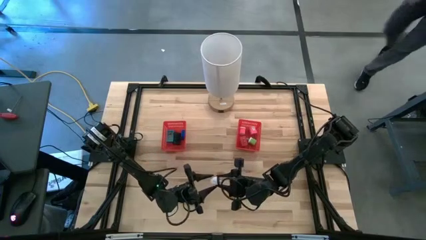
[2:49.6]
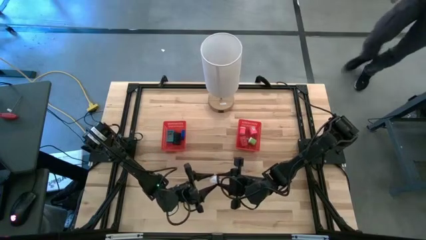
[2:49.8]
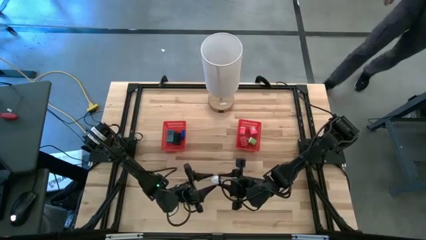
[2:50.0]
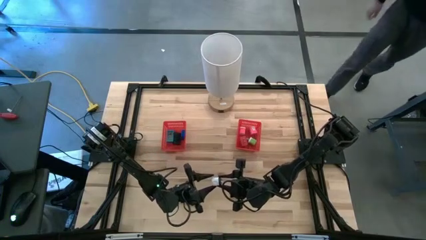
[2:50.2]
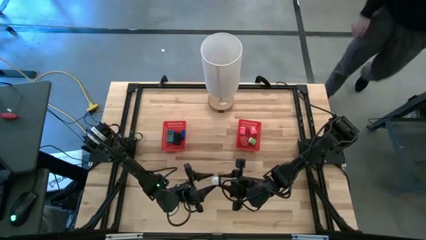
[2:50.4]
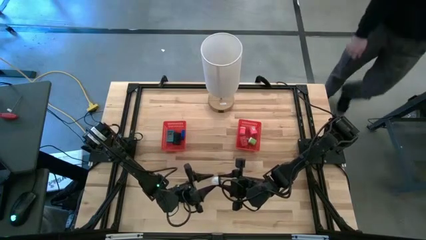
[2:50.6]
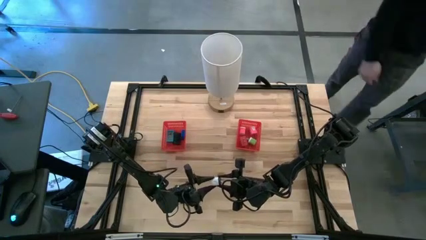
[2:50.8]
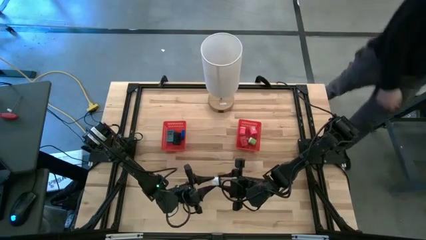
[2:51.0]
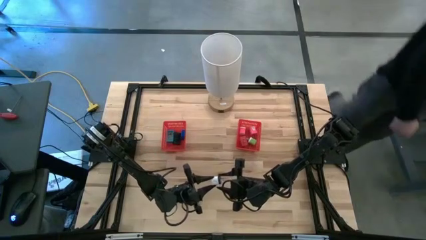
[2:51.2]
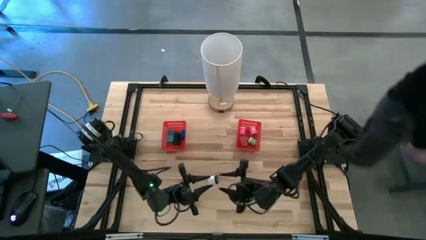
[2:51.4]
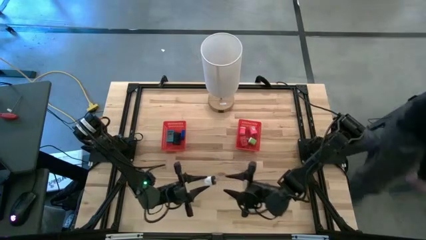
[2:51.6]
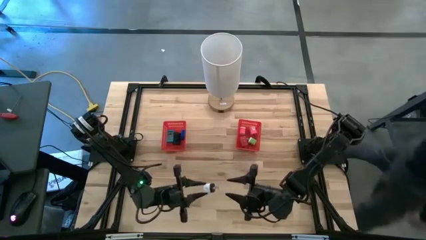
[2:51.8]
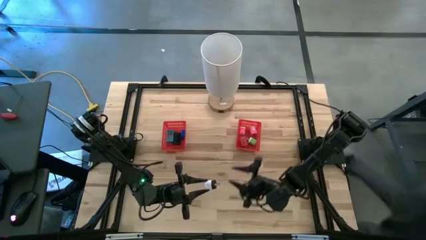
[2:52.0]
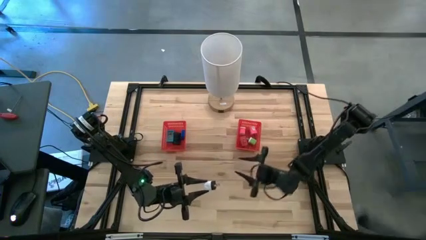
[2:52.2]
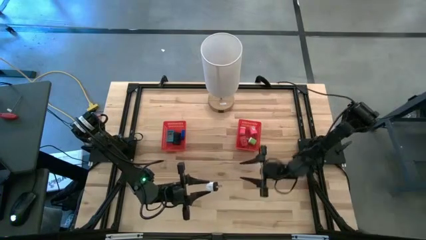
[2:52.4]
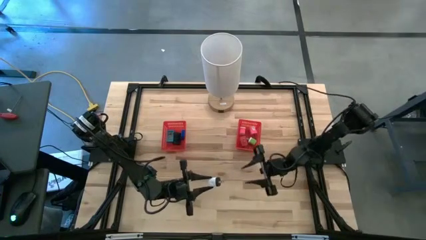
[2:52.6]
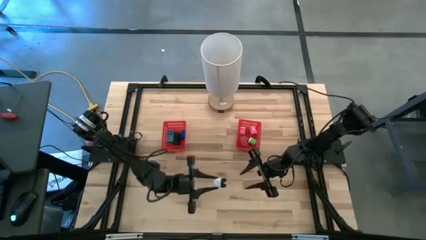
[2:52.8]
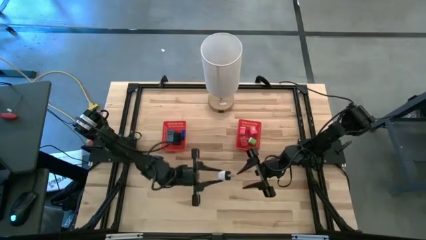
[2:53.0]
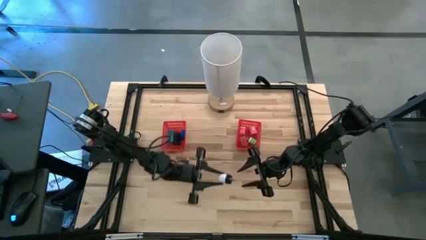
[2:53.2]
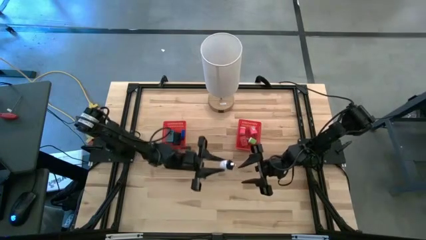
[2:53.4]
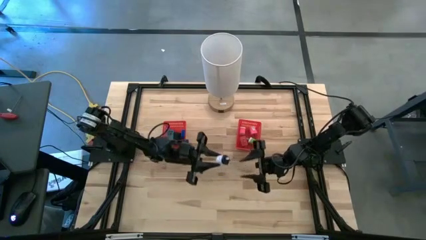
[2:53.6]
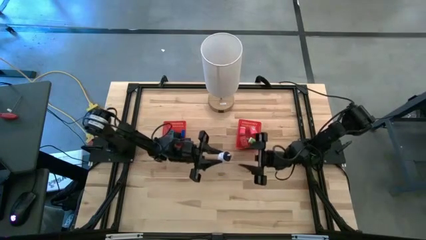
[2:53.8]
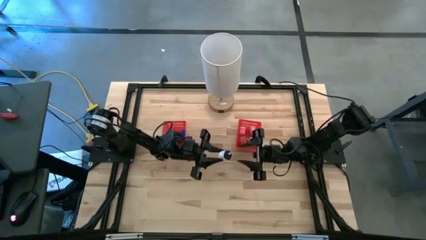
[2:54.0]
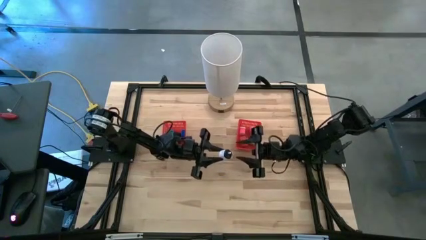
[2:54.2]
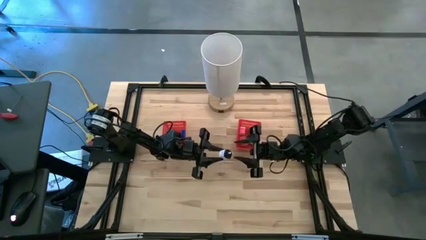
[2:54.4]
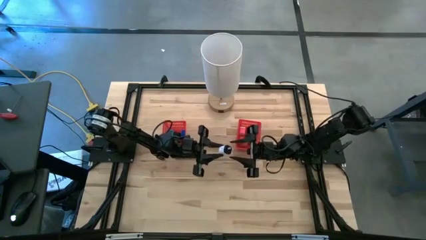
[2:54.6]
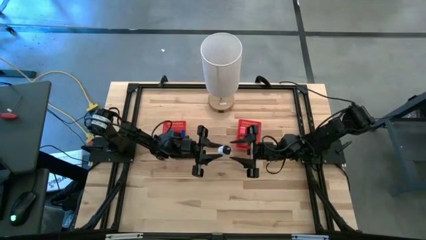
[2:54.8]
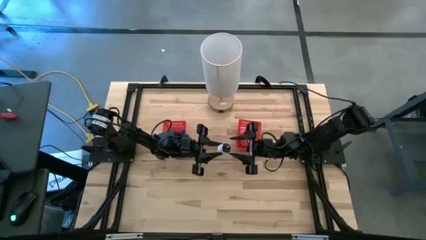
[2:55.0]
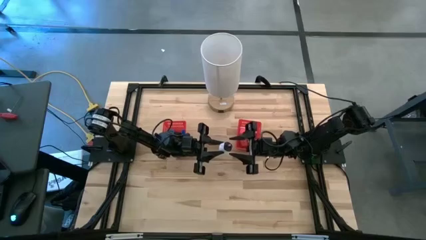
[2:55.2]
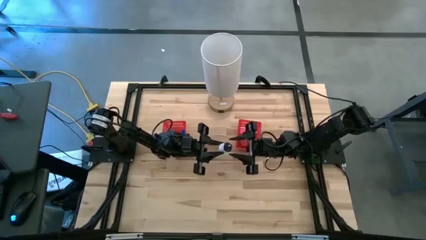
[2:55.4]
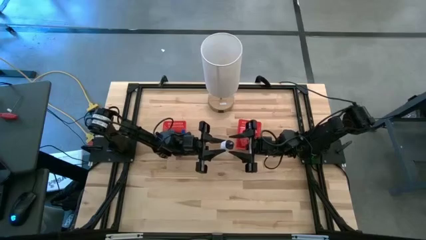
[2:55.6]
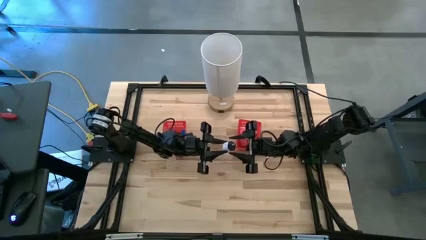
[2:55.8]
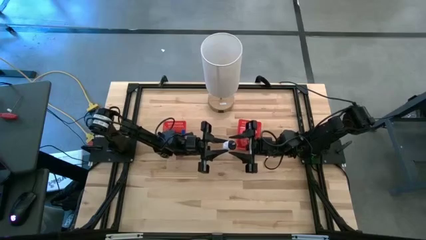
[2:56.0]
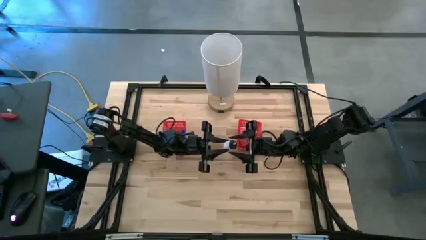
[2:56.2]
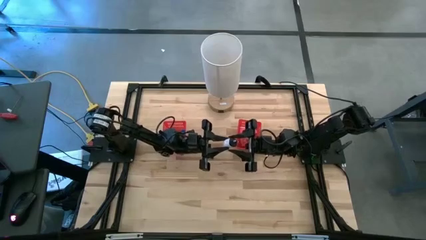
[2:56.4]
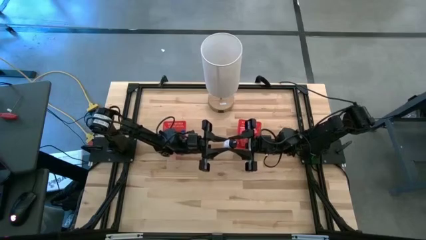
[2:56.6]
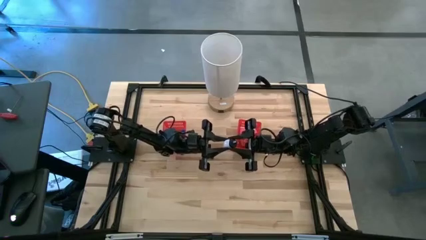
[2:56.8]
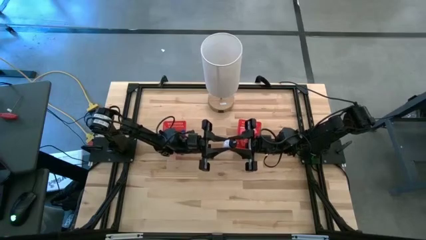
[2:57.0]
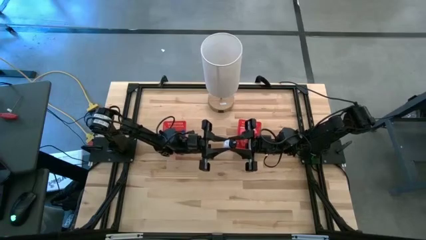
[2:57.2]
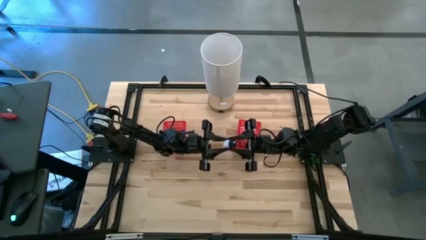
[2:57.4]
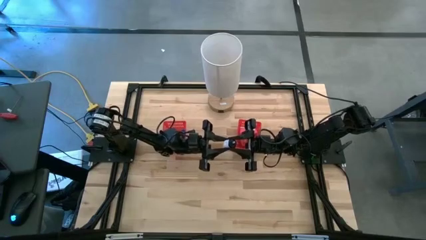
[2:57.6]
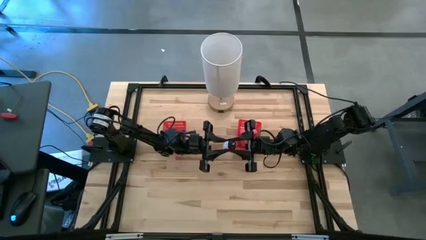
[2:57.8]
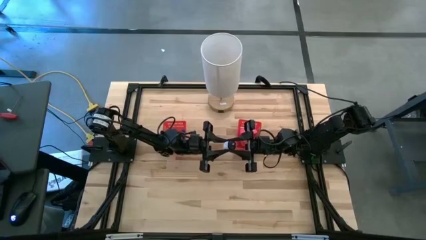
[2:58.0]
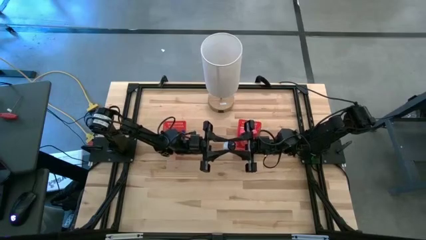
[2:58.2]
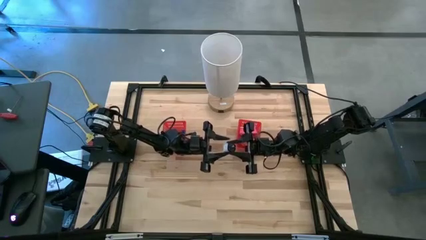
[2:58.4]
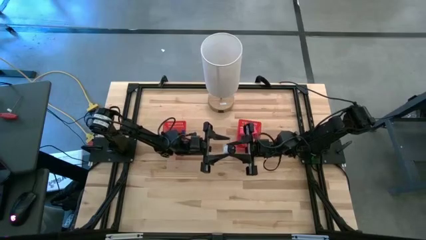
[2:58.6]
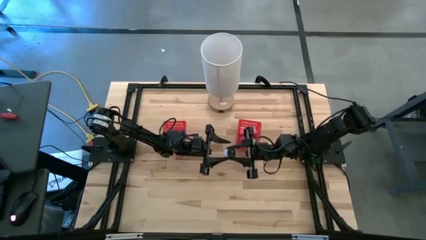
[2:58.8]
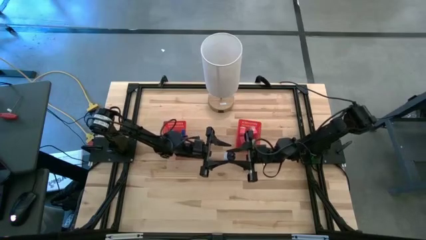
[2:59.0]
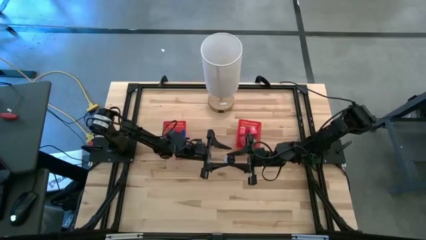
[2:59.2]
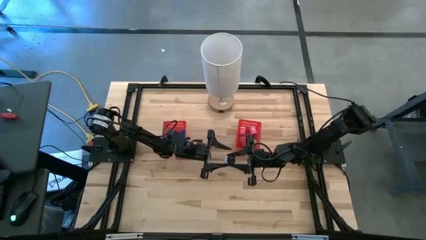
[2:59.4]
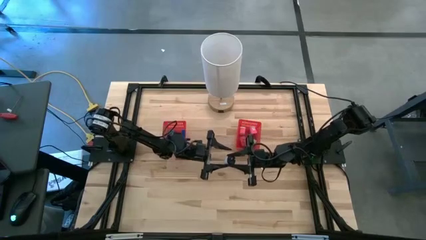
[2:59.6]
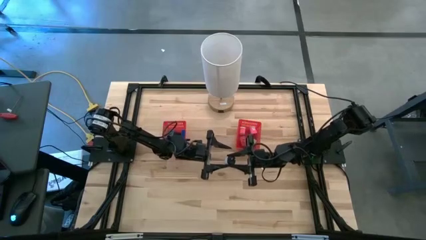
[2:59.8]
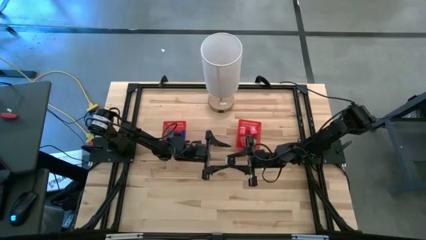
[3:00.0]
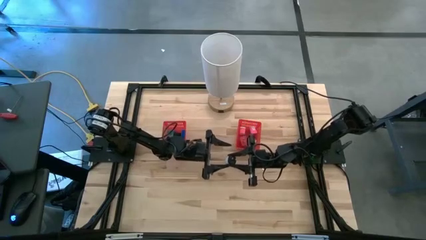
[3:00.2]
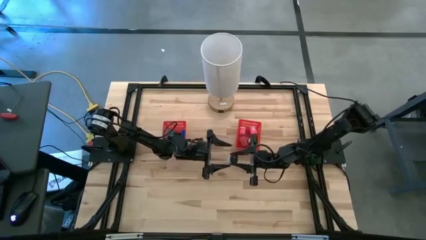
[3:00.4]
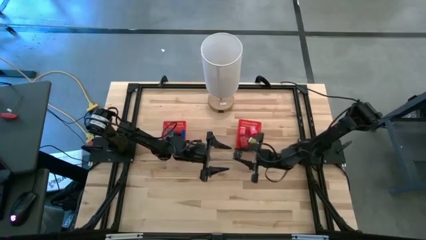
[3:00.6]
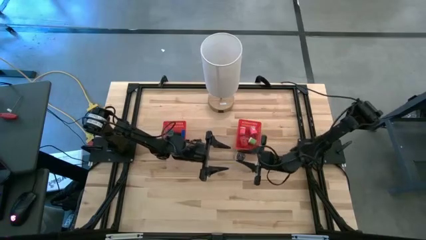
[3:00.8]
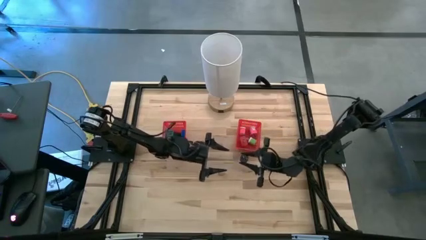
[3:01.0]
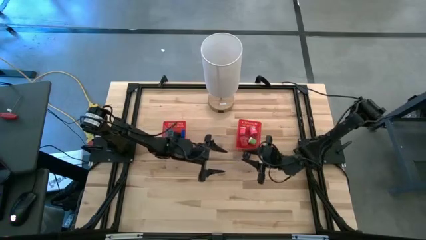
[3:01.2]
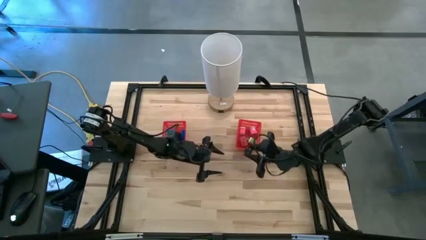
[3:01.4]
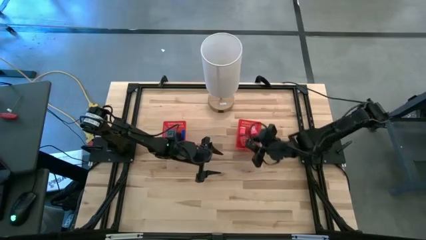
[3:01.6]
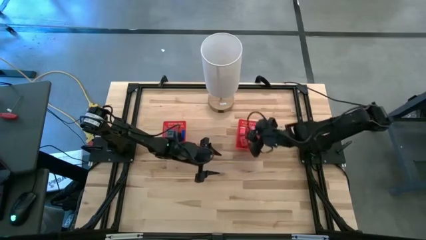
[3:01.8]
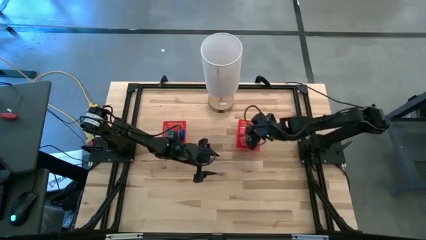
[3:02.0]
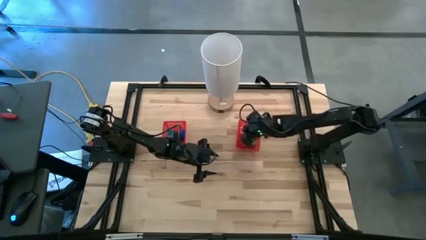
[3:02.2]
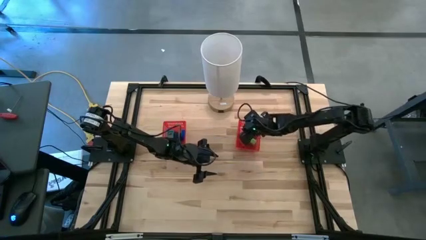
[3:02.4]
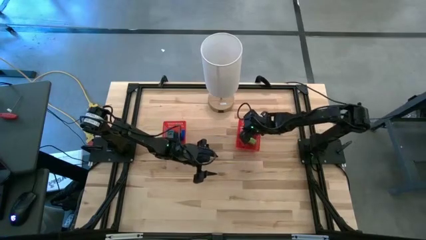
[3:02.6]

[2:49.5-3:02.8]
Task: Pick & Place Office items
Put the white charger adapter into the right red bin

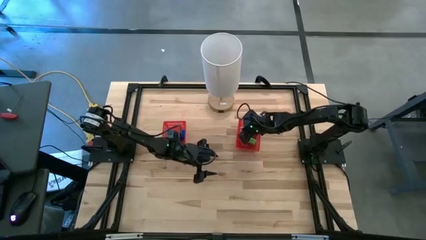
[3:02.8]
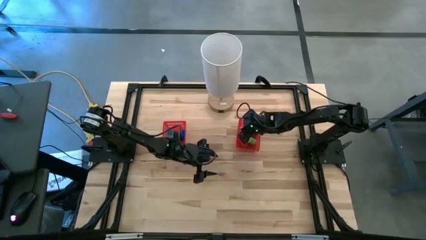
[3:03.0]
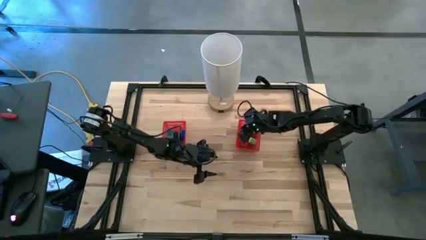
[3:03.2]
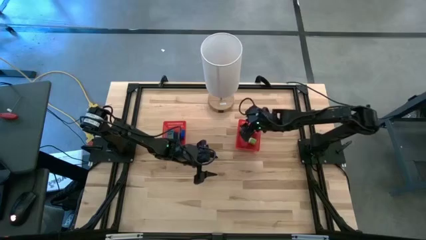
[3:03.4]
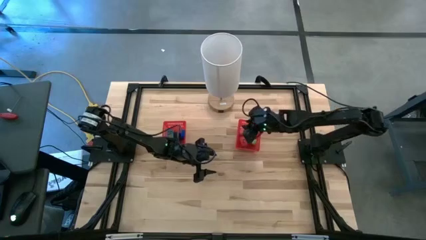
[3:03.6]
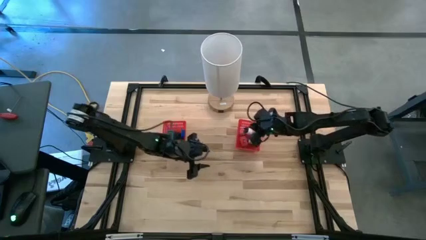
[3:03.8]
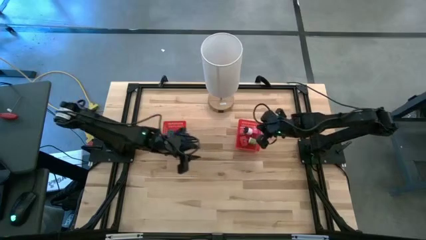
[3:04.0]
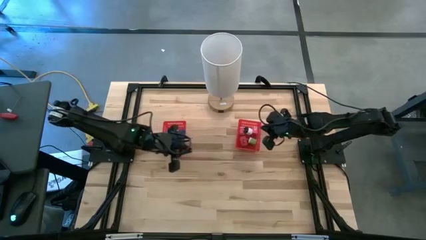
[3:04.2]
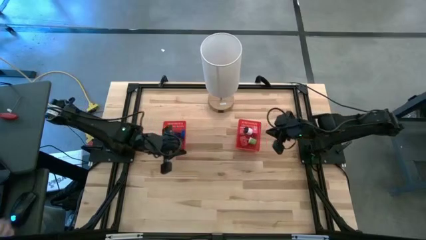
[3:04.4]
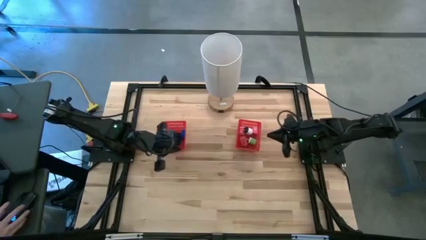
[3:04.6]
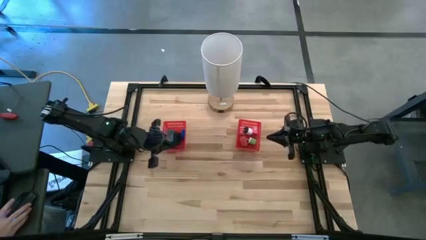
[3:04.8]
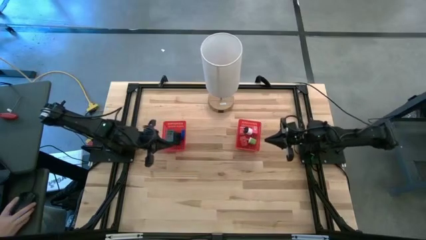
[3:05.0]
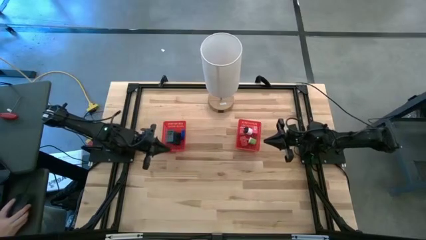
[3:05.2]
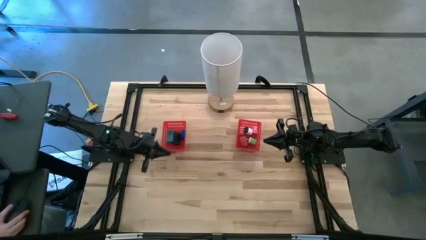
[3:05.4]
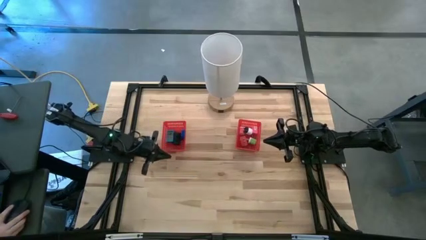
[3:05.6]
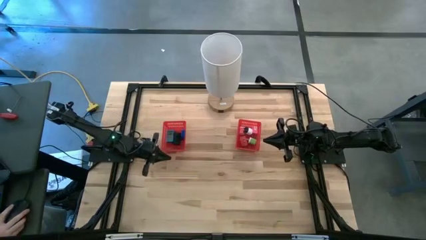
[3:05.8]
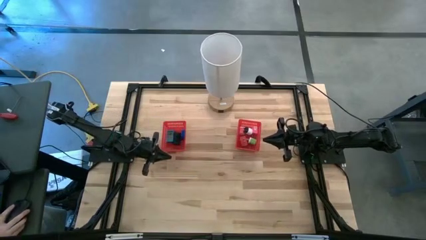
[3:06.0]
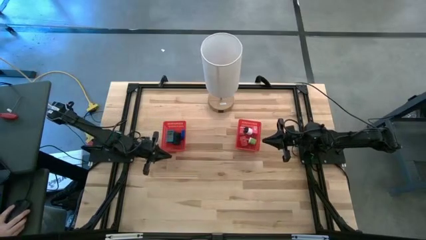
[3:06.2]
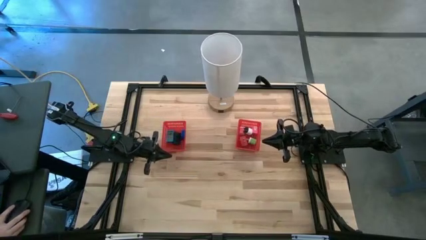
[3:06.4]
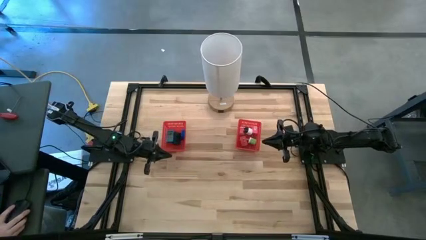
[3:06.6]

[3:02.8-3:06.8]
Return to Home Position
